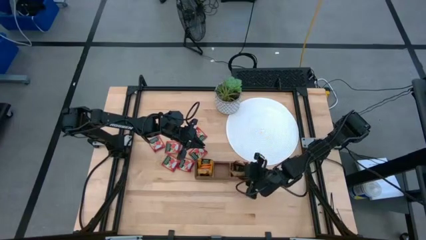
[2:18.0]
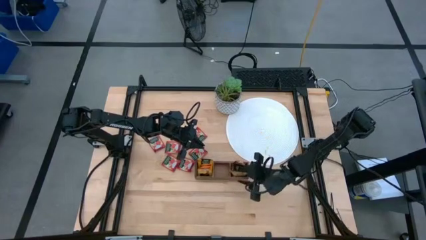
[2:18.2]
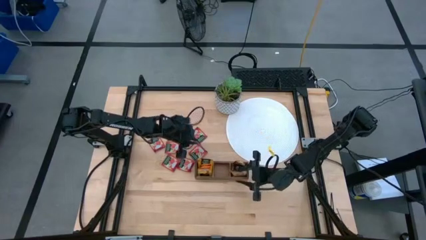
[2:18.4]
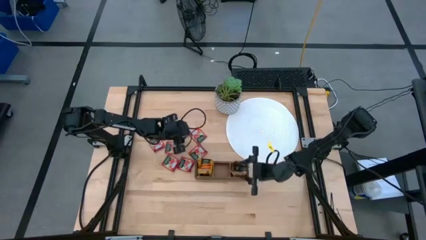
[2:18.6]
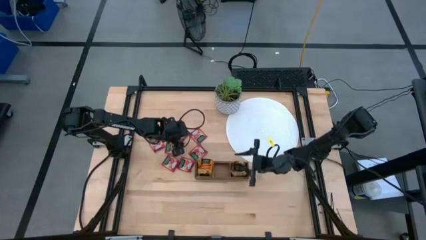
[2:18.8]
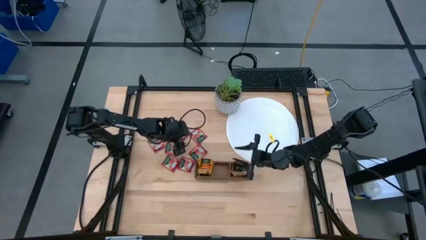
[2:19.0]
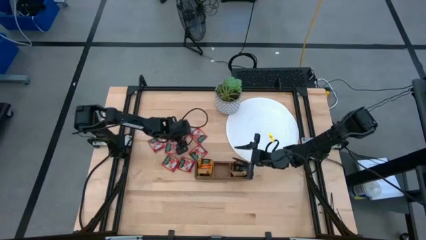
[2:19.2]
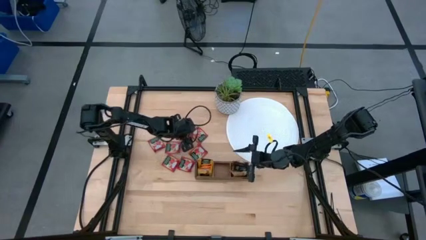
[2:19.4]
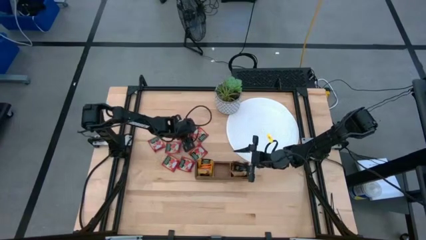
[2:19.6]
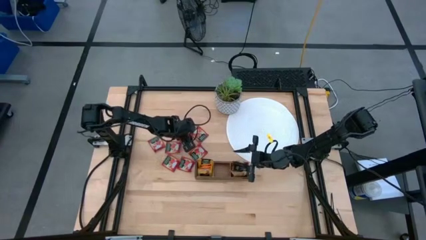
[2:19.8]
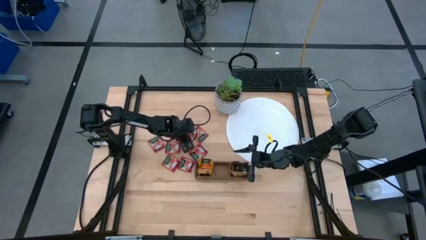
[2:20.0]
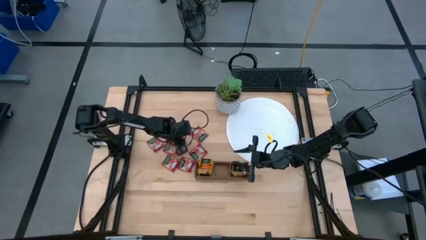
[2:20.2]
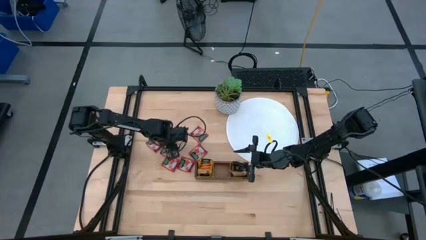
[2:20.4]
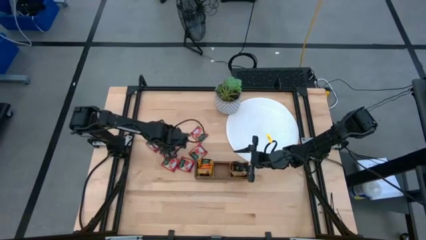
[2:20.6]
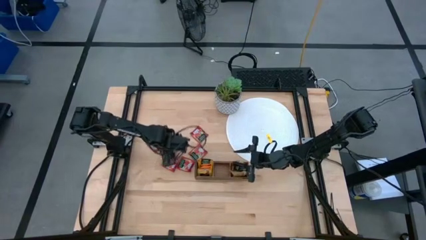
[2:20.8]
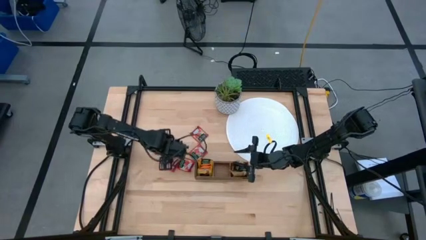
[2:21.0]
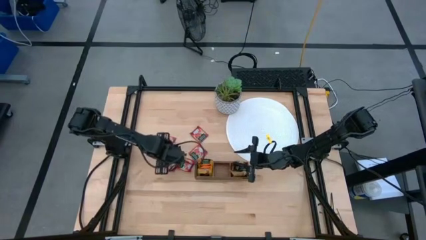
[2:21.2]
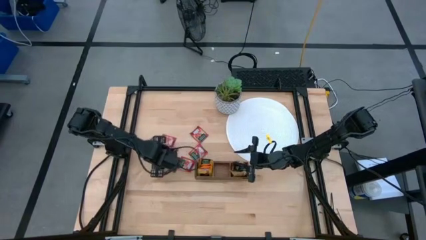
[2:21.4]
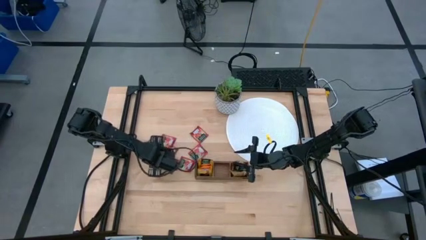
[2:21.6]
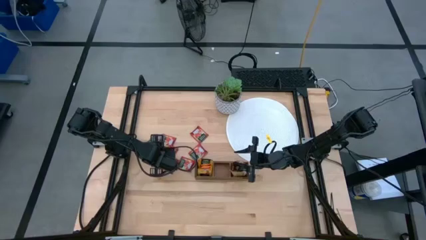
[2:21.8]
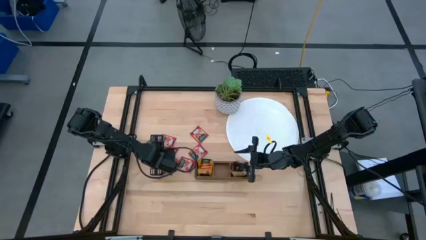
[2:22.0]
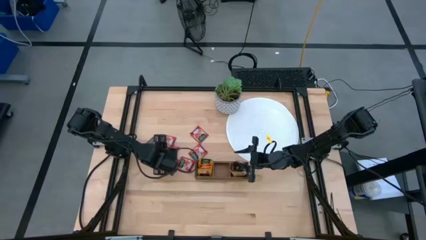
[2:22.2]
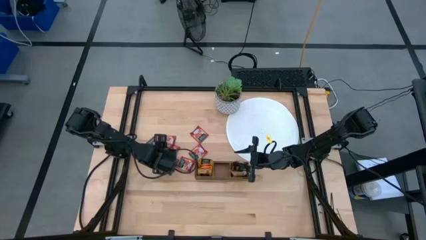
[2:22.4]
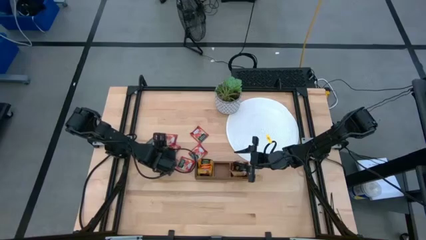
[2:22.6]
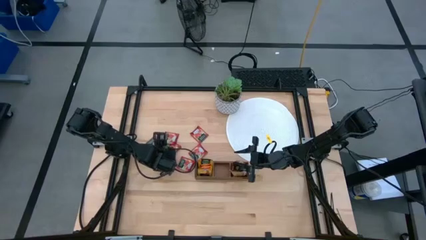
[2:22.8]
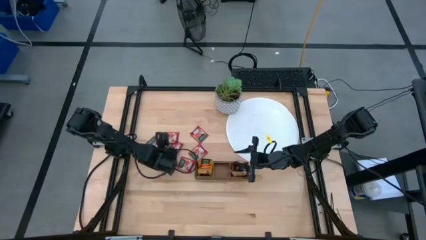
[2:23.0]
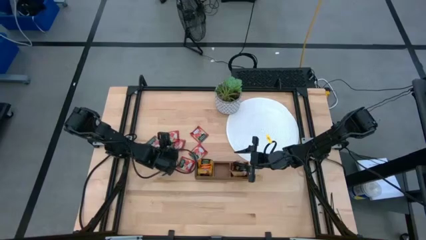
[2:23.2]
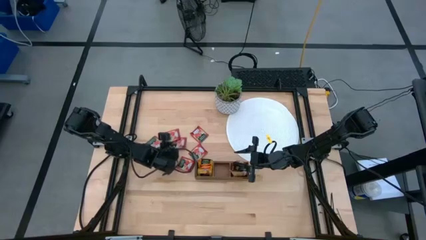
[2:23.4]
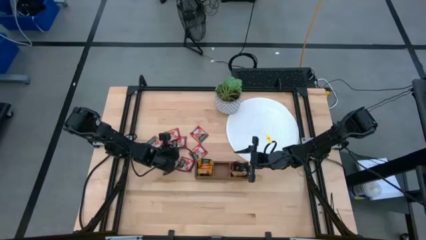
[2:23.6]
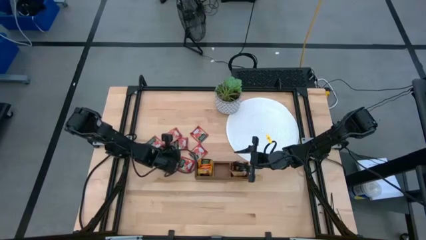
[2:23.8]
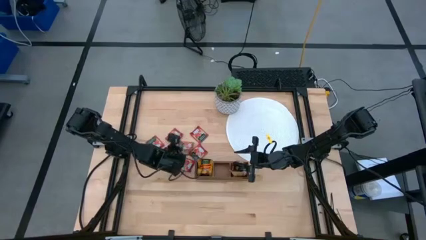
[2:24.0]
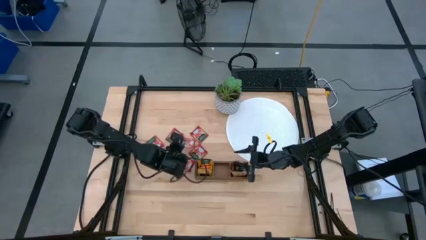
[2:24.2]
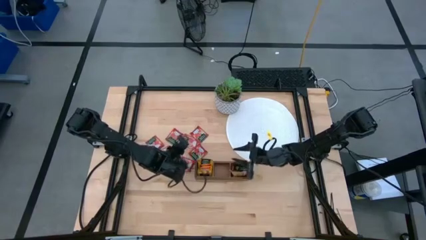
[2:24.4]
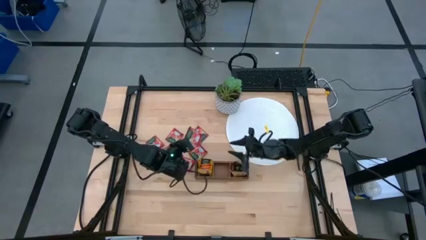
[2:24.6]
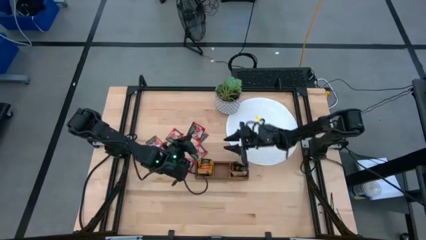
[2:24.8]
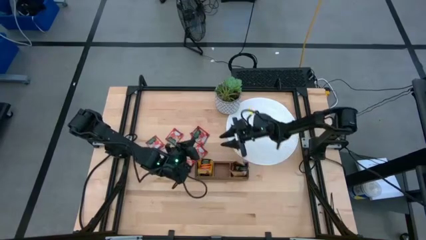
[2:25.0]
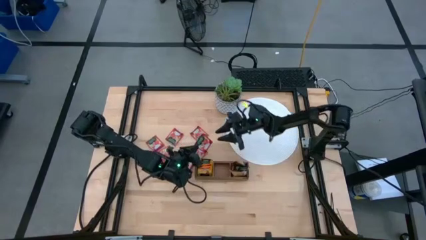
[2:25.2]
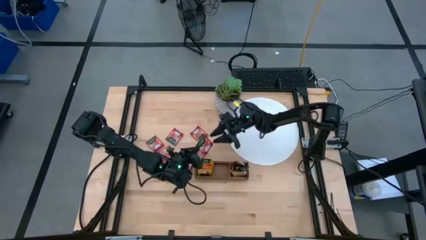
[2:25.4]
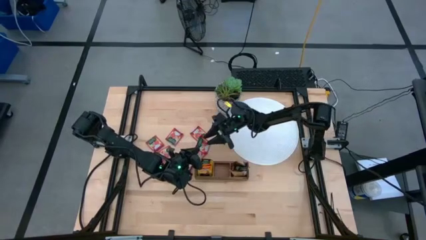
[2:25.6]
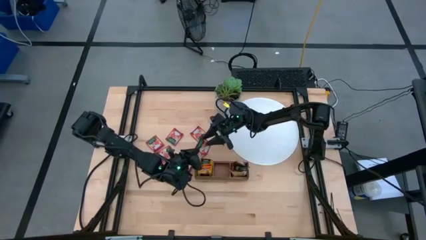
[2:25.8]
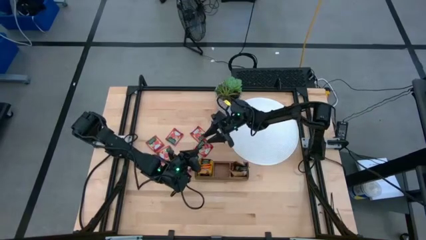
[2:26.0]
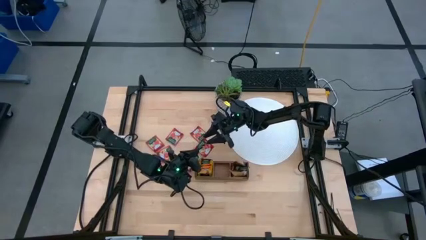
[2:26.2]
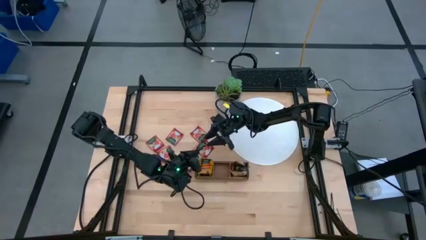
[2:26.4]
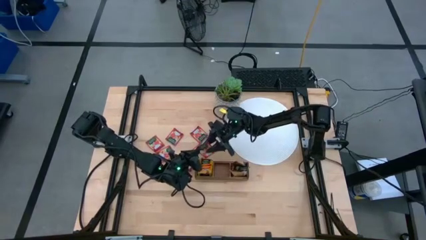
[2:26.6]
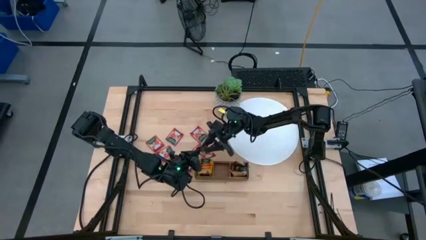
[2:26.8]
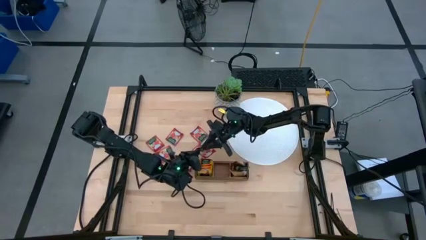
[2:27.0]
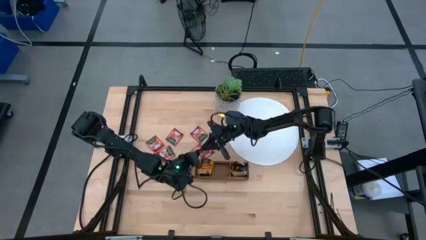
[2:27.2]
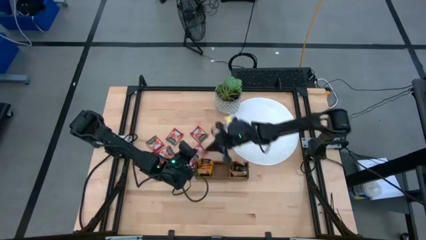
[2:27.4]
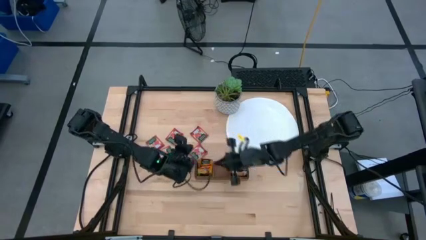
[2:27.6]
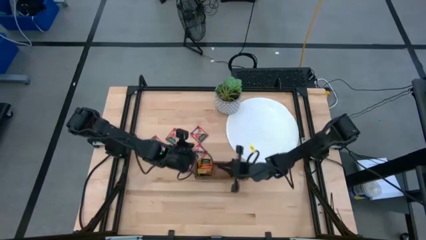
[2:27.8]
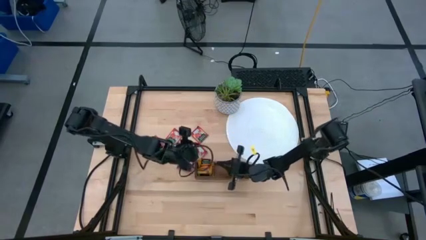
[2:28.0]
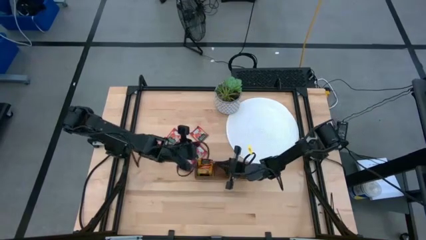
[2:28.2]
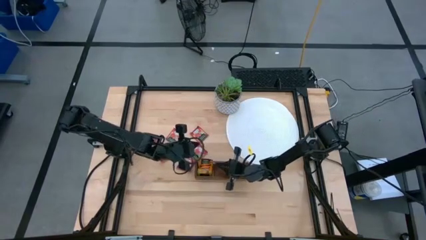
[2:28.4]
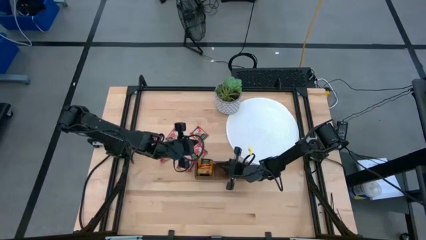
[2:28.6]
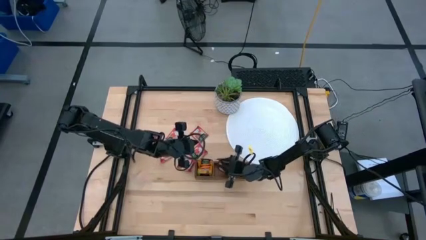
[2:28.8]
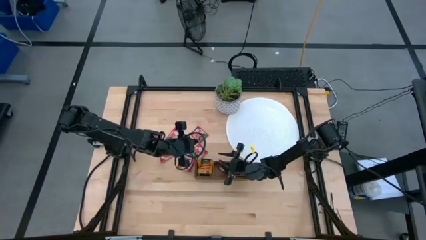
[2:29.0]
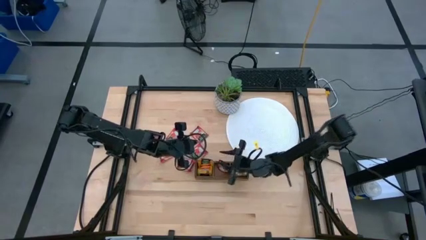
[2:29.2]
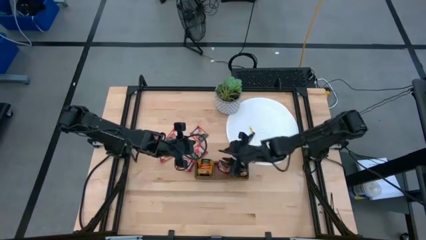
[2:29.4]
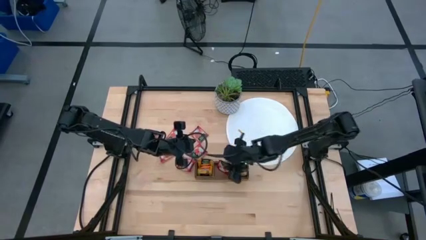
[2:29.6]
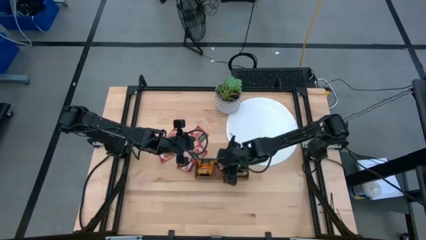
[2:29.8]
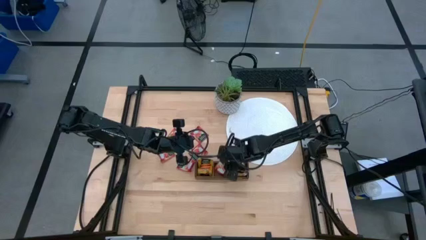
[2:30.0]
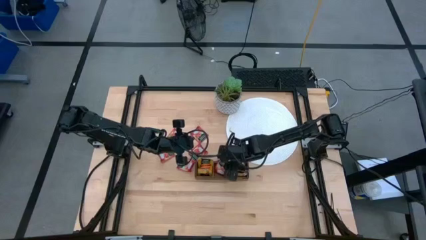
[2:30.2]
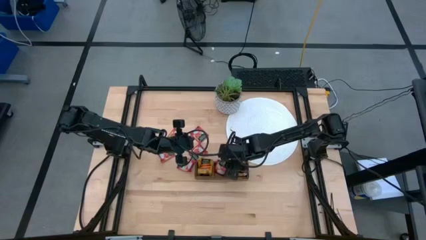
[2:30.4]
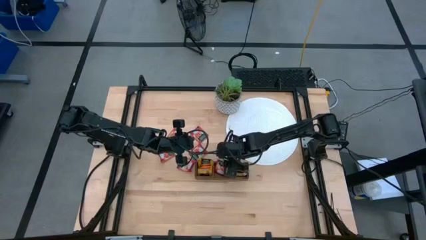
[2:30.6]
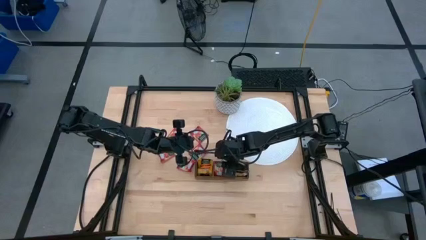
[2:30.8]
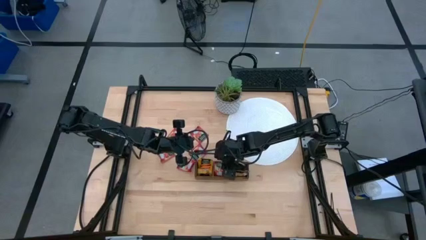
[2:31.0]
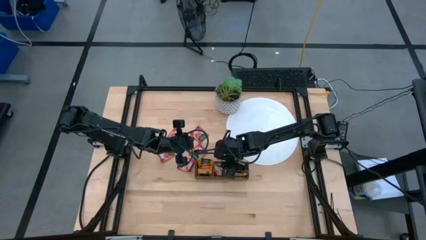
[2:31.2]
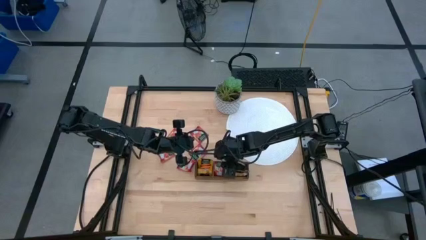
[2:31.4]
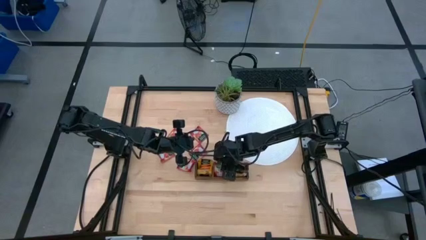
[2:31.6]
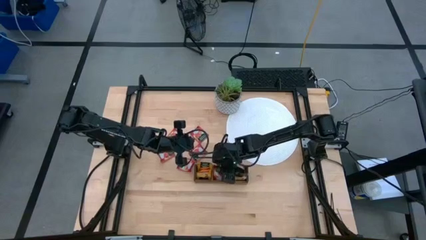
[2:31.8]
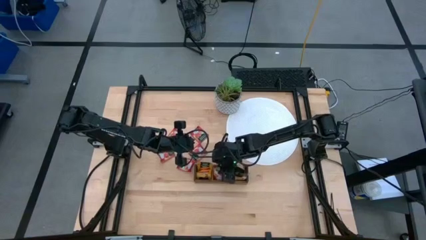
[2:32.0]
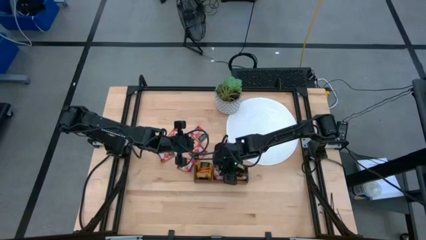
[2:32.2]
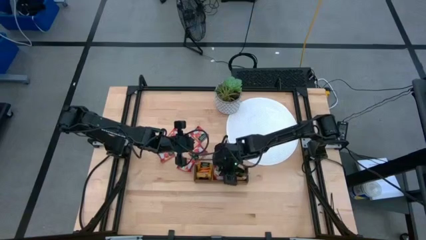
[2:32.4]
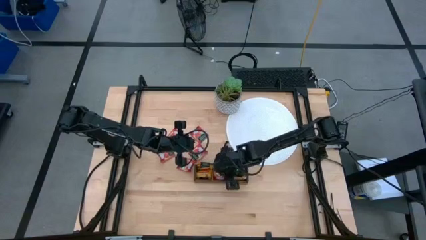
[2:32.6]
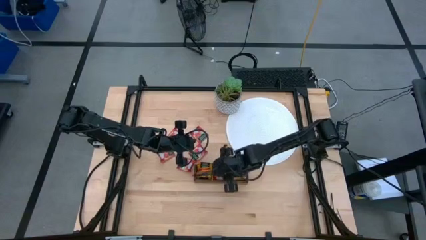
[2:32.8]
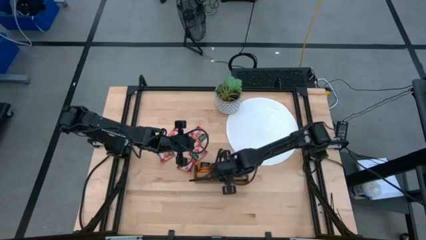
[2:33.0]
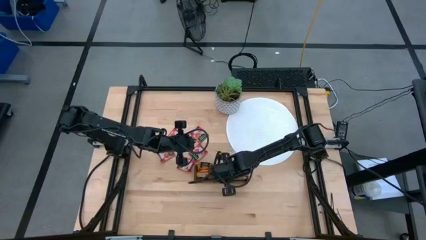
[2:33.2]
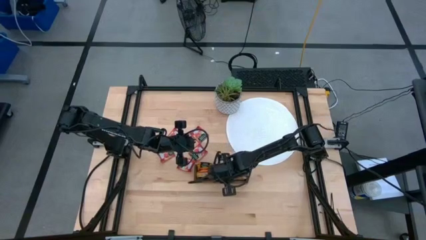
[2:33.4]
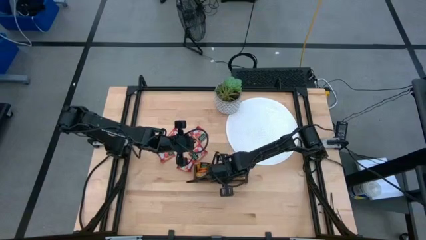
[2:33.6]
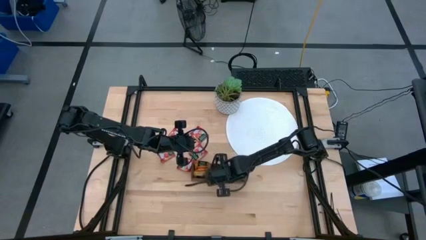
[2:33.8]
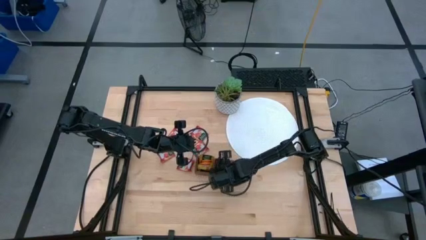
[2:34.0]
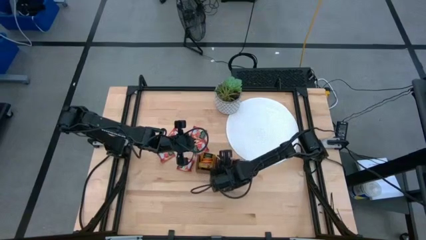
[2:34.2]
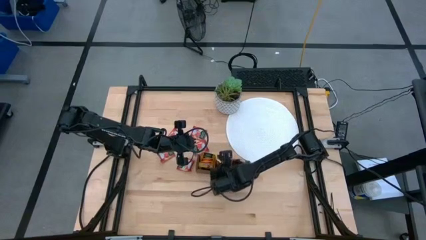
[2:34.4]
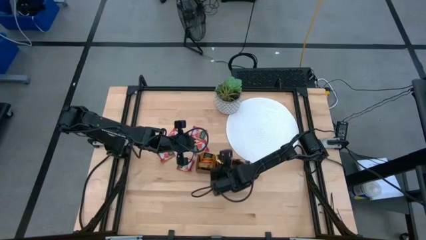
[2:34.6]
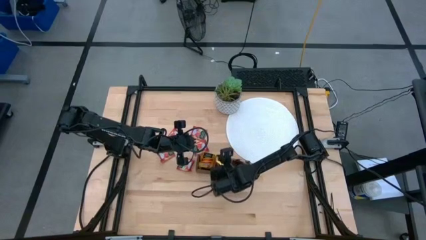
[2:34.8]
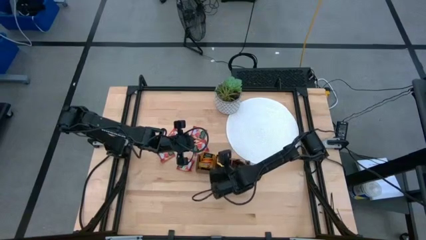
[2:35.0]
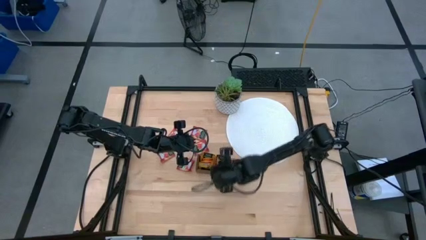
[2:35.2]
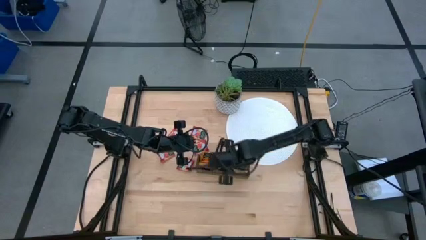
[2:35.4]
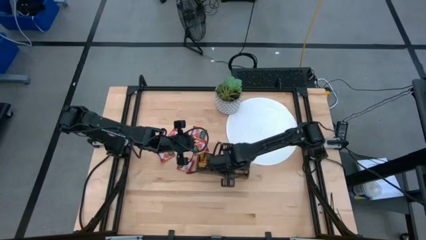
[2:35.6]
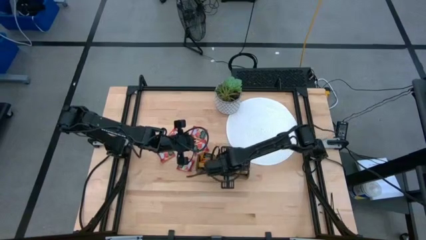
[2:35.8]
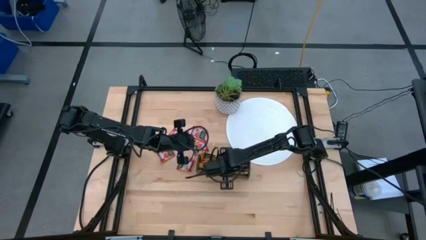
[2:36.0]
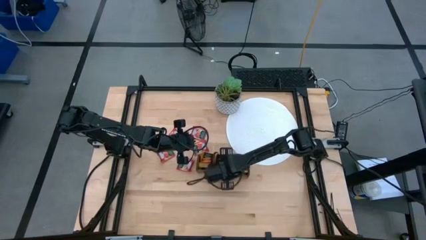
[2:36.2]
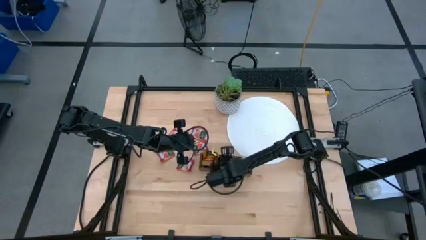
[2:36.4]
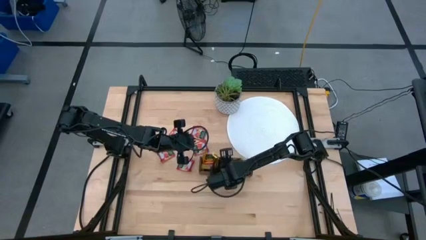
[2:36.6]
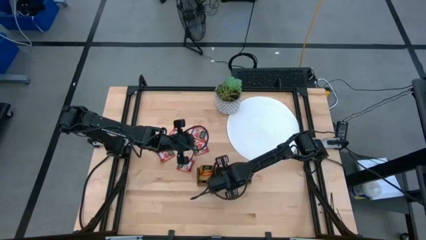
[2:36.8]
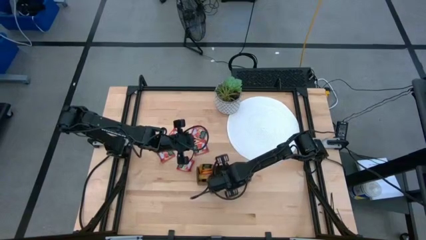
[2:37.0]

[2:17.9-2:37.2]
Task: Pick & Place Tea
Put the red tea bag into the middle section of the wooden organizer
